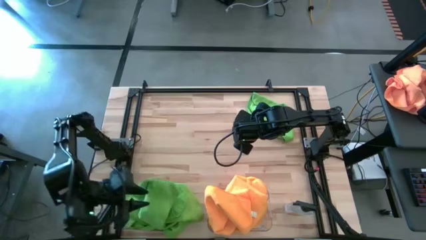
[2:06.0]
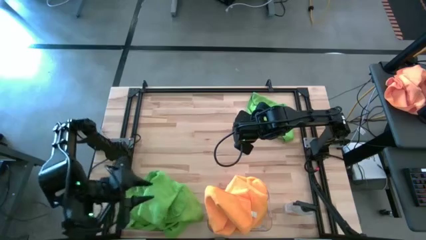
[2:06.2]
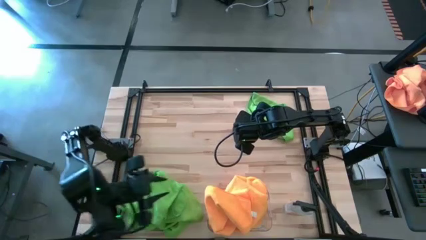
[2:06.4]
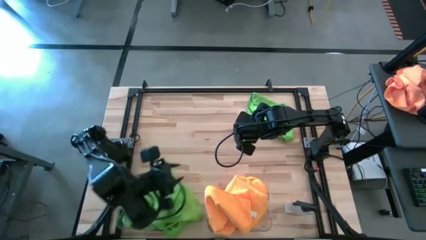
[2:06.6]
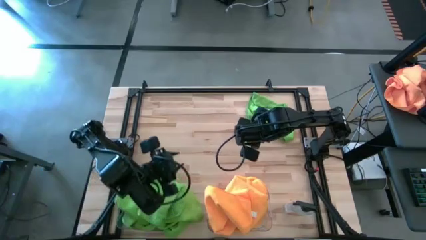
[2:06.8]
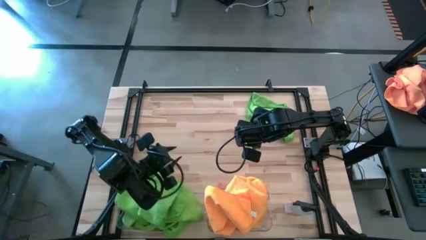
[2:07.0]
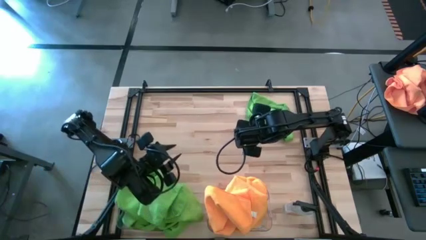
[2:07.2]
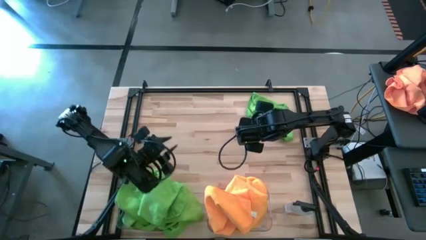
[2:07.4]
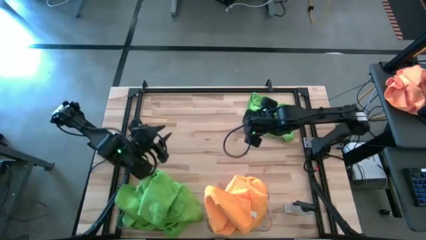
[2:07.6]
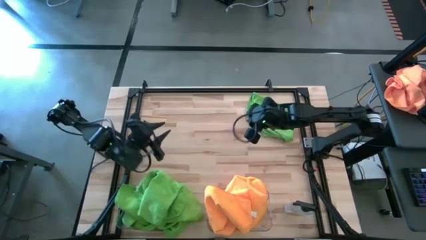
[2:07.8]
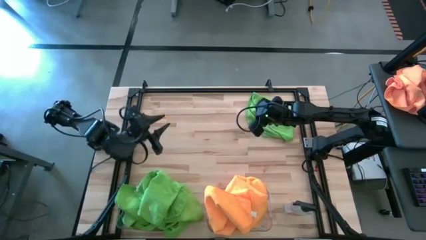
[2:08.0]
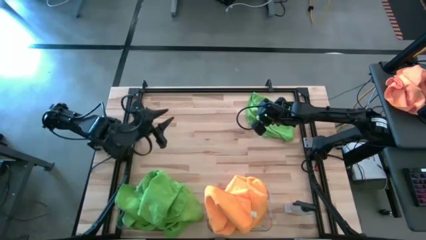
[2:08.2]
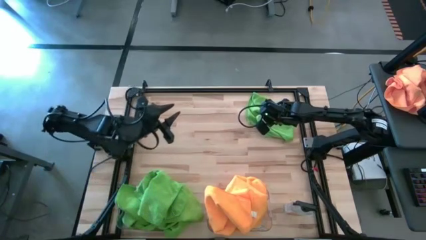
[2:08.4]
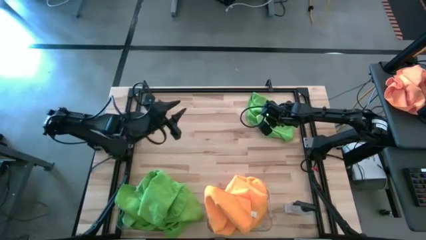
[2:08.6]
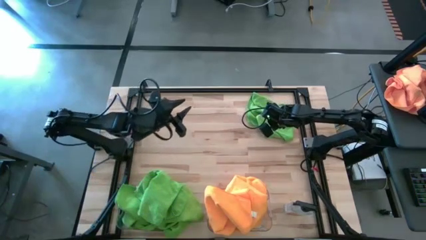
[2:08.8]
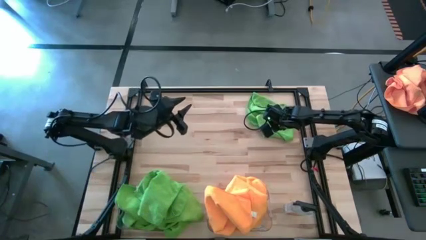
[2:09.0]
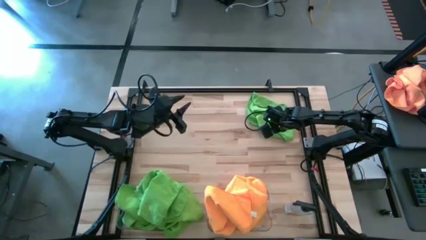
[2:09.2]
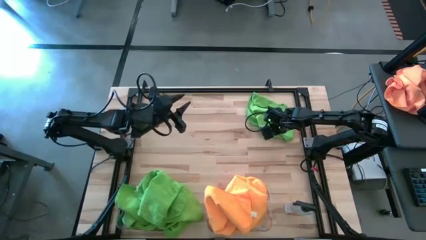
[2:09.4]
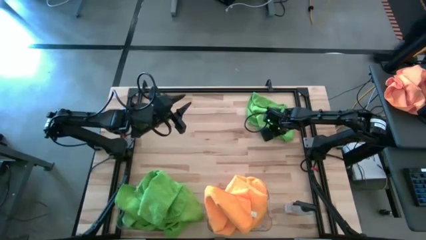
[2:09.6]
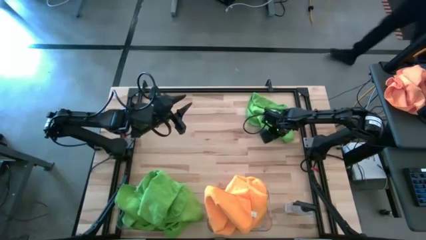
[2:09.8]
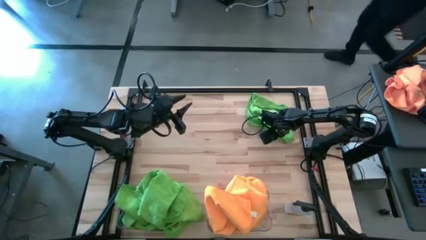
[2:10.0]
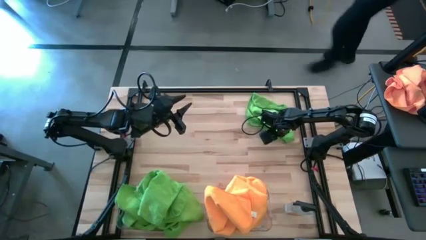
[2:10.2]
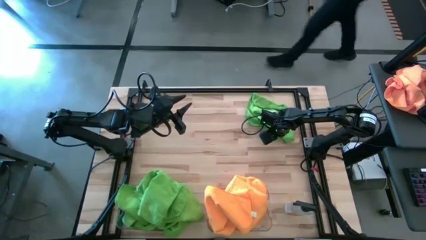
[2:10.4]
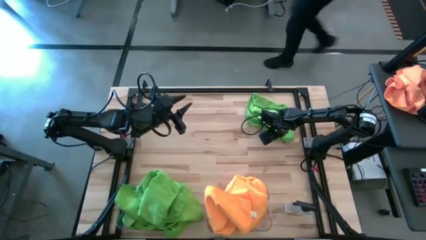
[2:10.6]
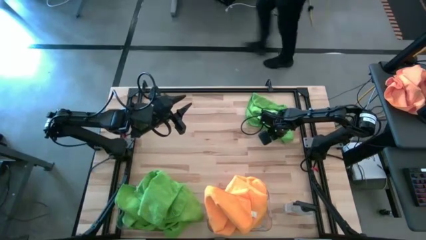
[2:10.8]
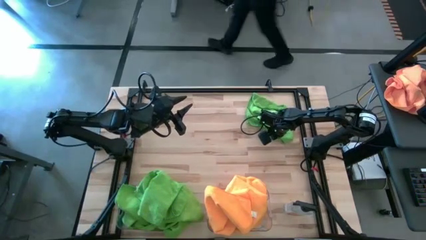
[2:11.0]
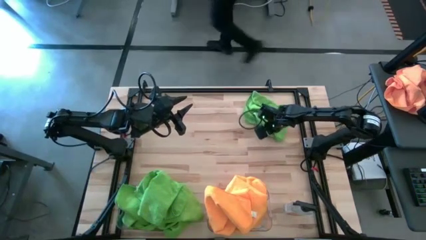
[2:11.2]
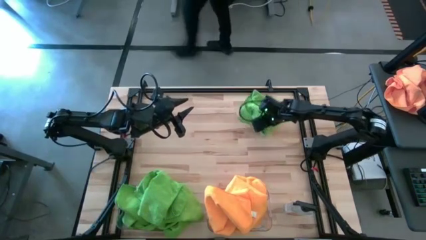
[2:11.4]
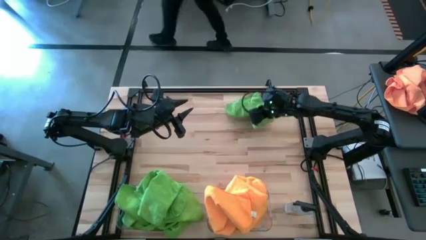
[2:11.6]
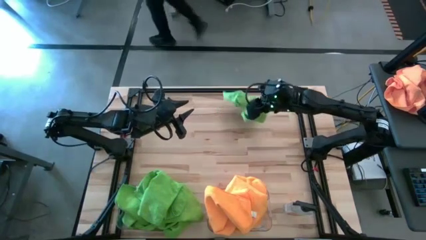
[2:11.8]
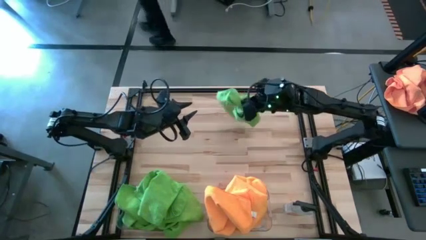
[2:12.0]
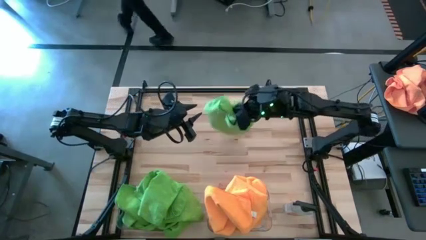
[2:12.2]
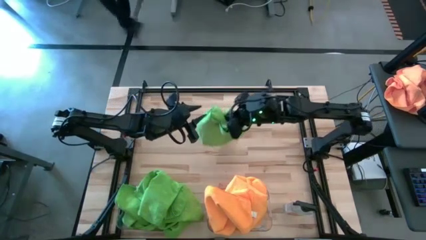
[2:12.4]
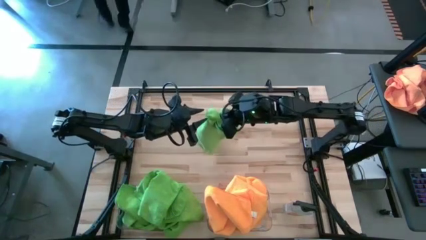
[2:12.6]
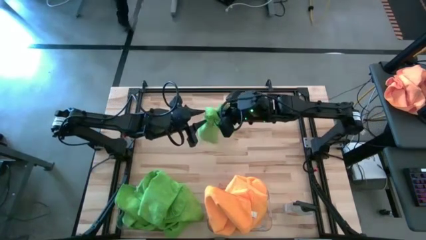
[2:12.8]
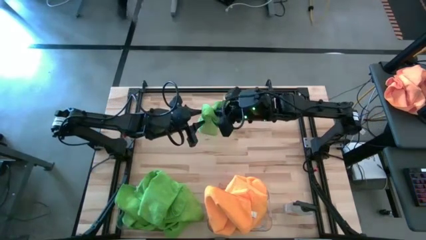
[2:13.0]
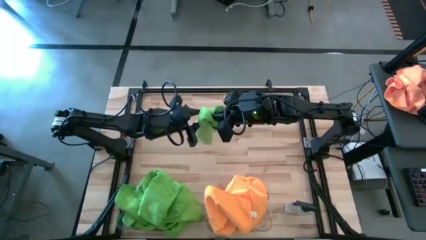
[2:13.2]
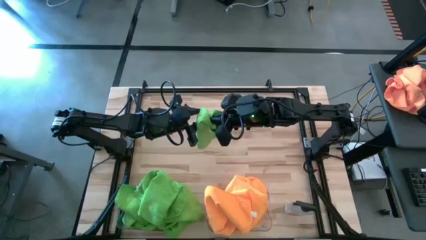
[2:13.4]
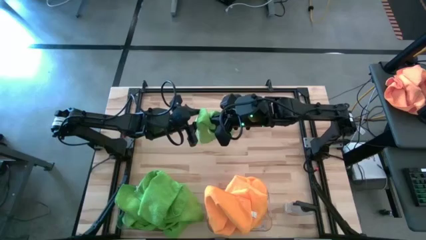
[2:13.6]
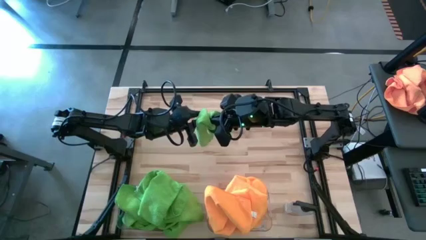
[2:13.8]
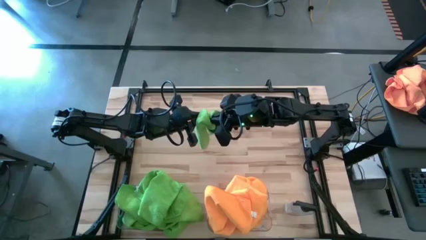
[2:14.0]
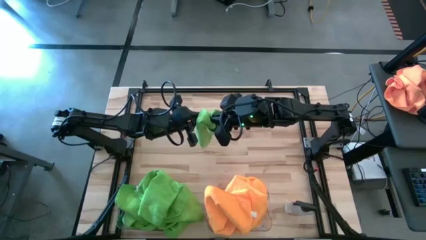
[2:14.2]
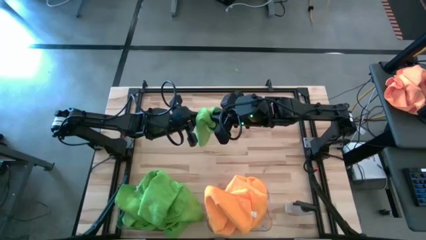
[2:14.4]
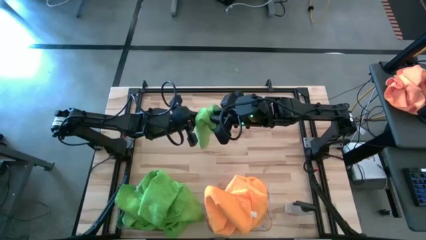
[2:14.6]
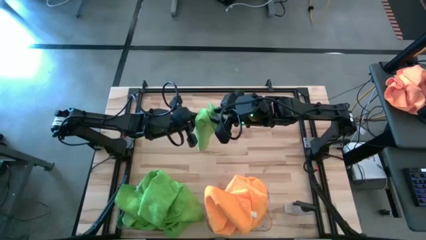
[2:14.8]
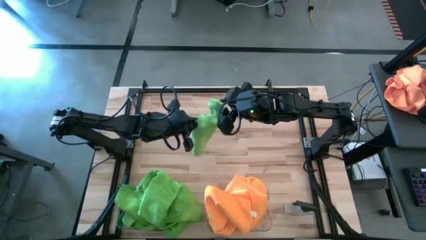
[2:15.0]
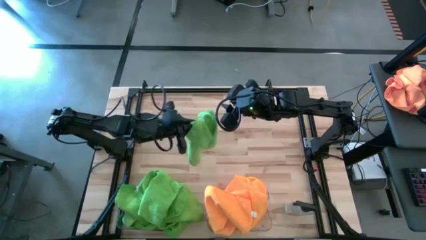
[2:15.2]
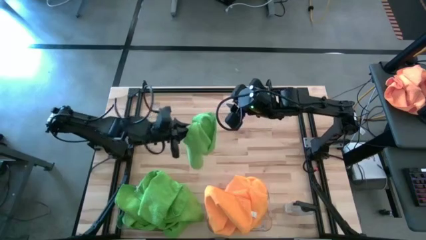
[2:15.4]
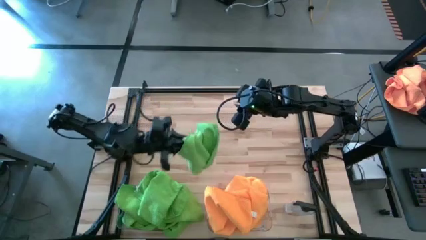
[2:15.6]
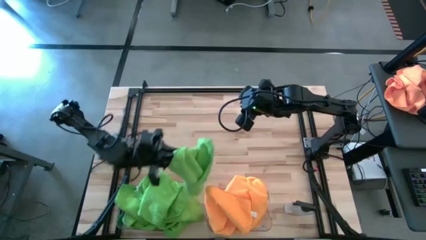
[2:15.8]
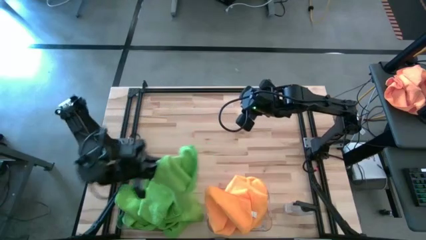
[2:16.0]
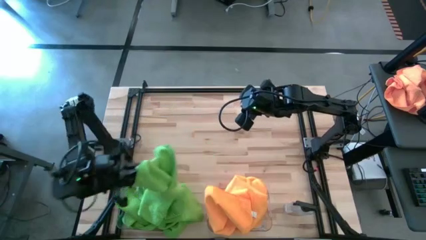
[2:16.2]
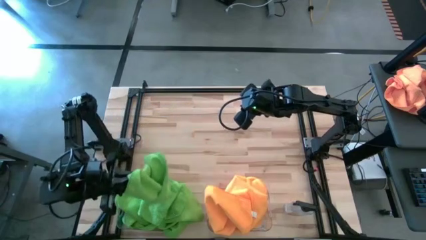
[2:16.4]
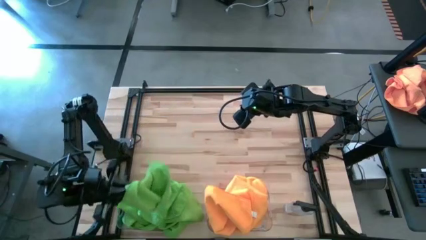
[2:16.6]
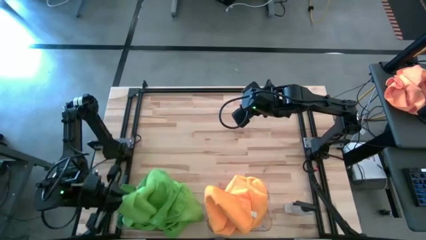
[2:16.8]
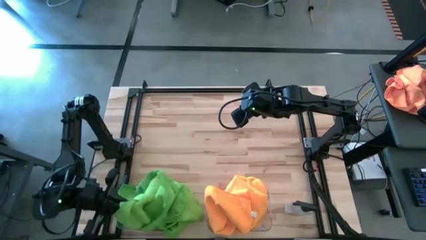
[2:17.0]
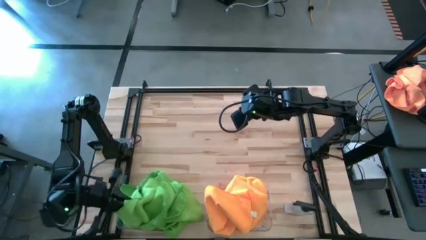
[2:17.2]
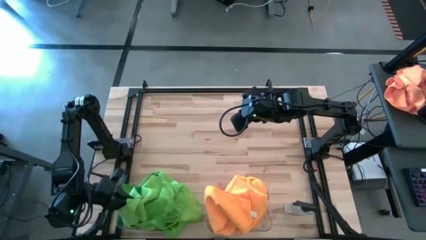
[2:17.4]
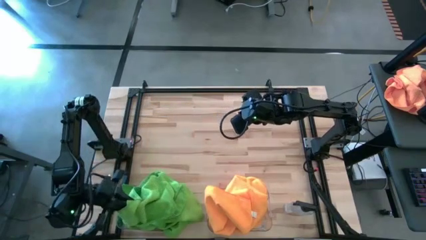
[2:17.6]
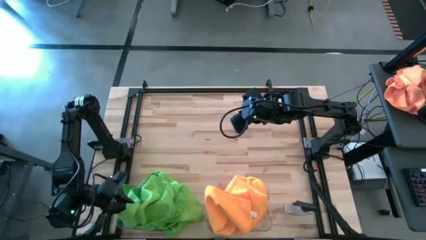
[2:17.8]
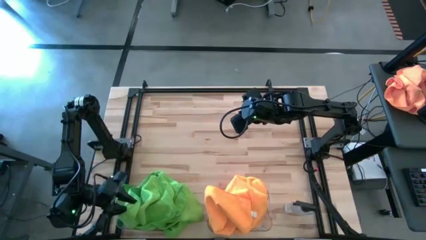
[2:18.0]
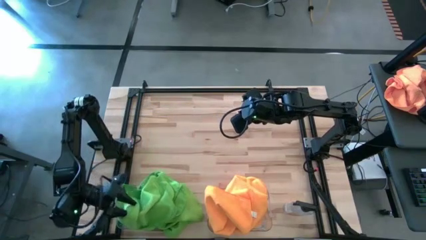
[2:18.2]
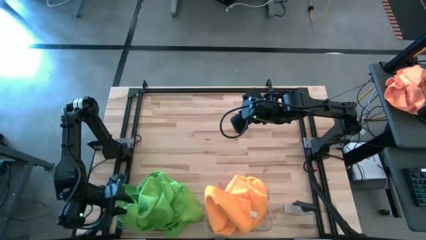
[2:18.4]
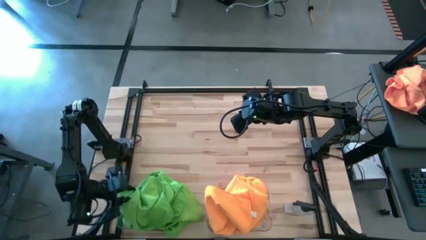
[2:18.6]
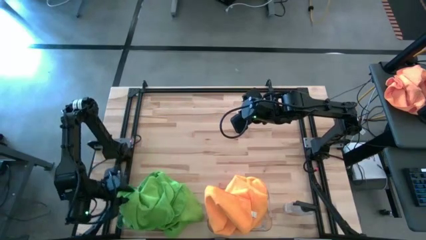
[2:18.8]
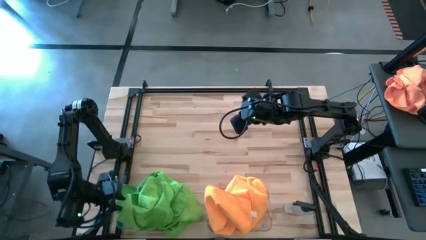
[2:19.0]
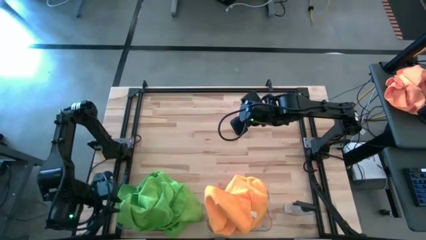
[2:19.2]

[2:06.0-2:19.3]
Task: Sort microfiber towel by color & place in baskets
Put the green towel into the left transparent bin
